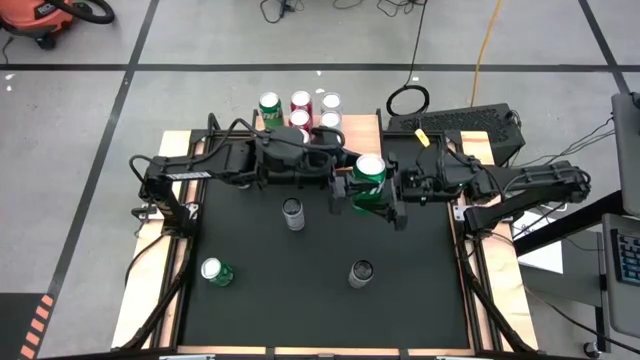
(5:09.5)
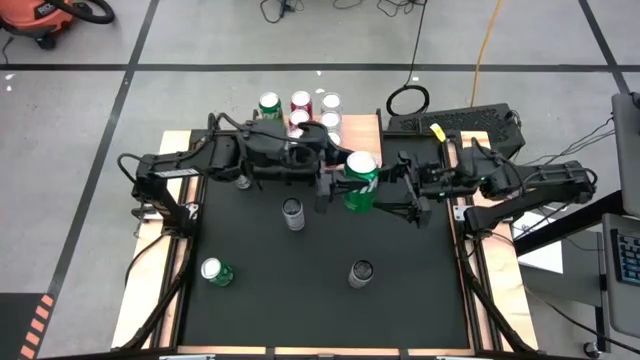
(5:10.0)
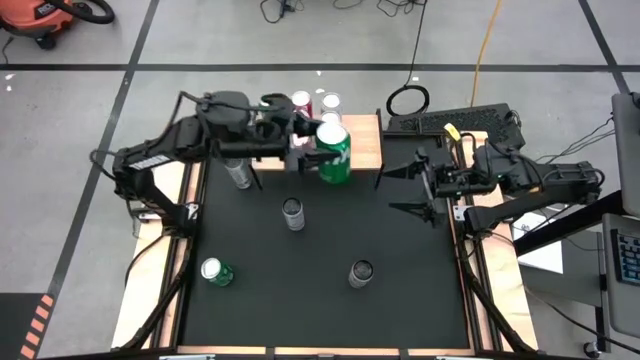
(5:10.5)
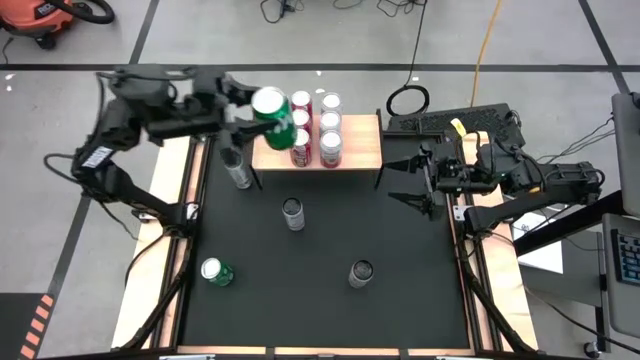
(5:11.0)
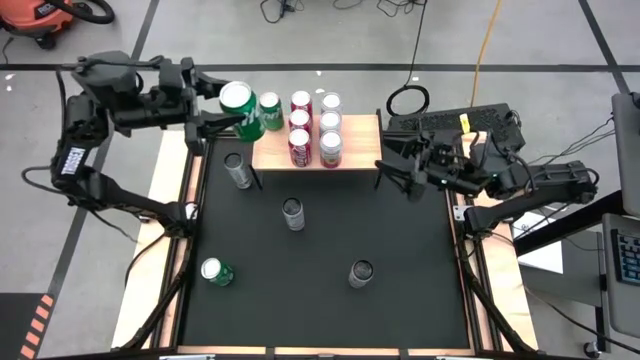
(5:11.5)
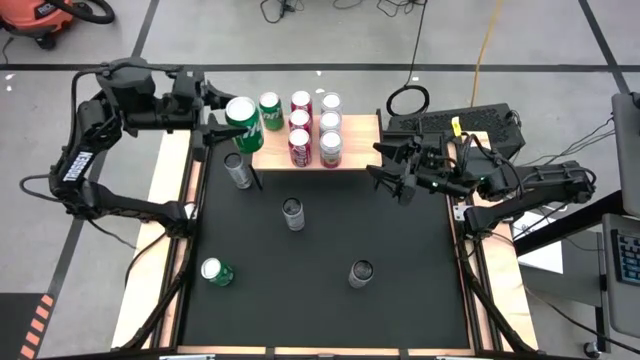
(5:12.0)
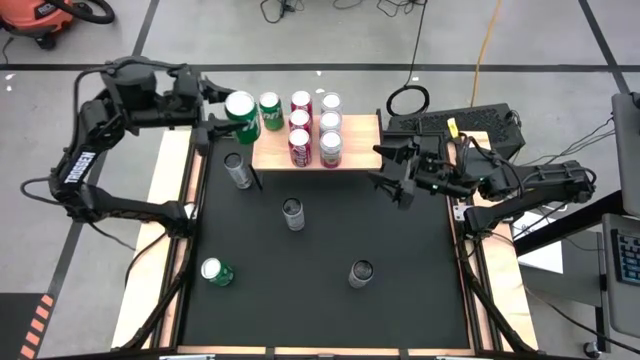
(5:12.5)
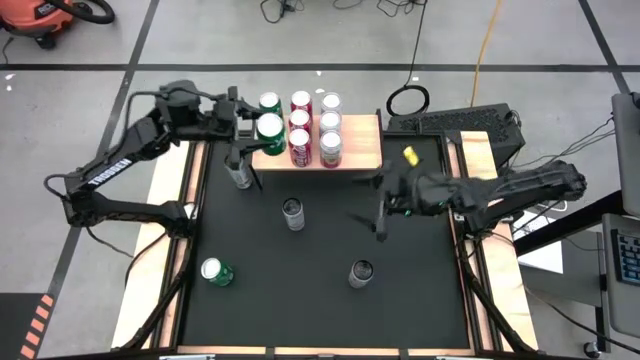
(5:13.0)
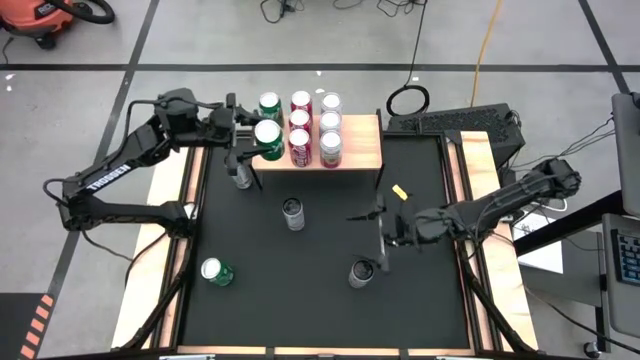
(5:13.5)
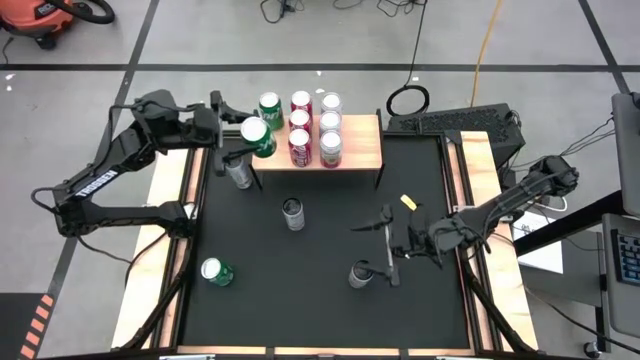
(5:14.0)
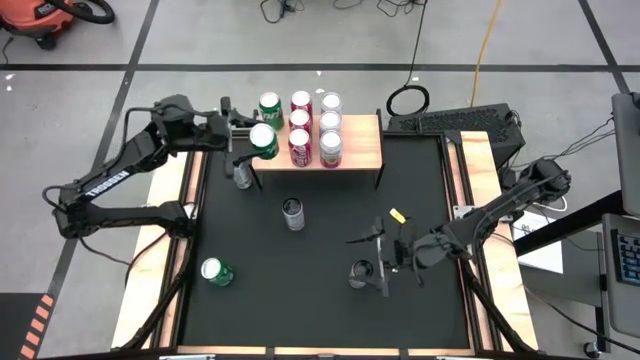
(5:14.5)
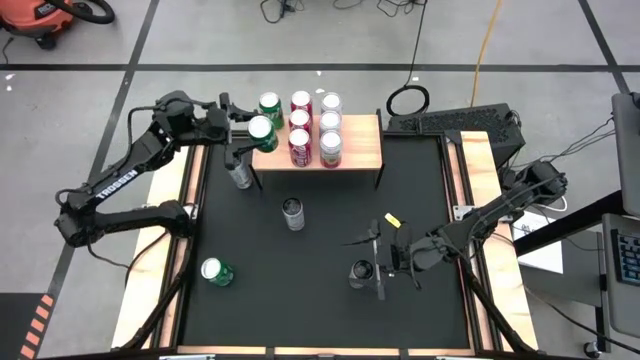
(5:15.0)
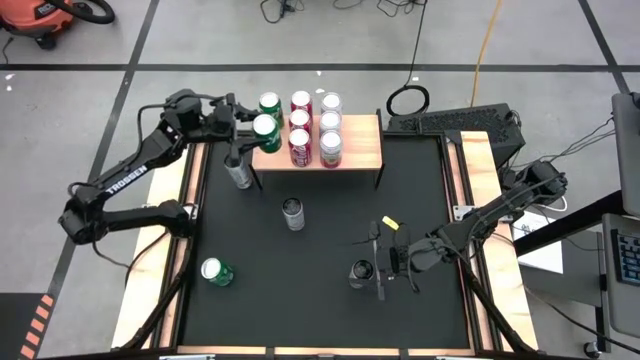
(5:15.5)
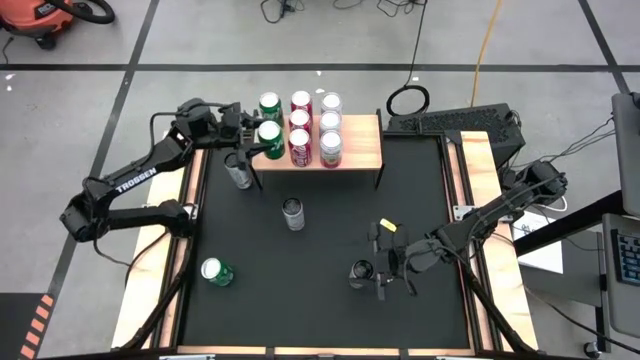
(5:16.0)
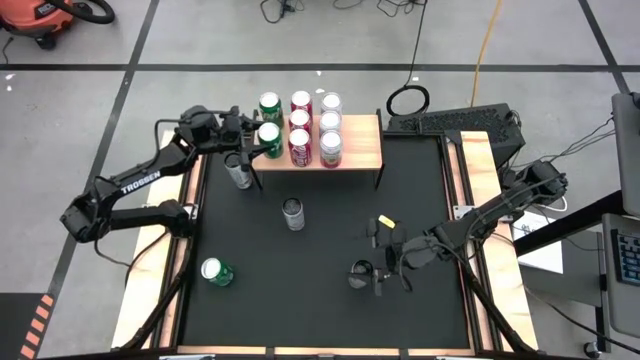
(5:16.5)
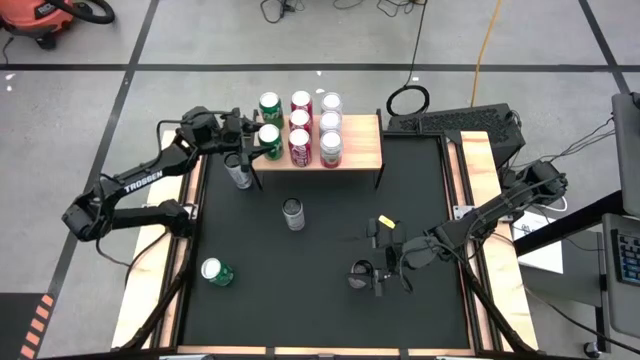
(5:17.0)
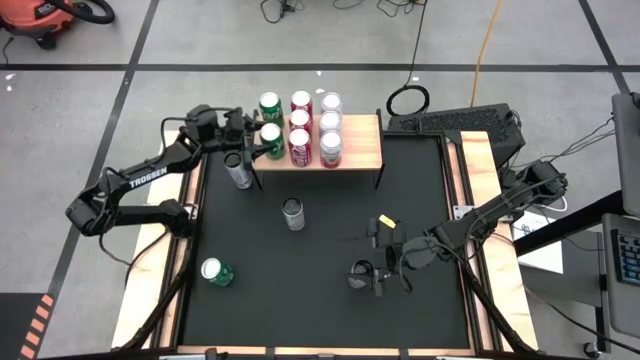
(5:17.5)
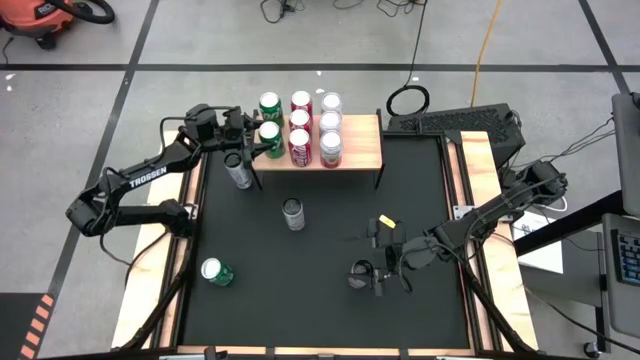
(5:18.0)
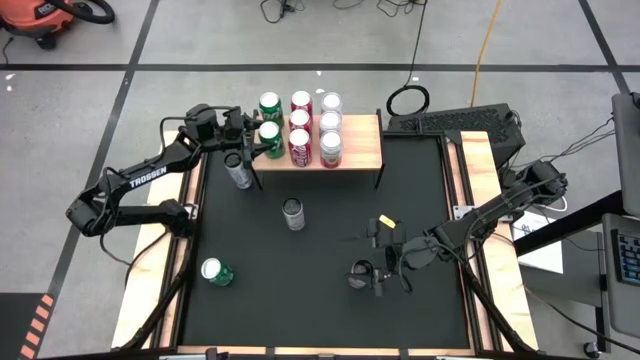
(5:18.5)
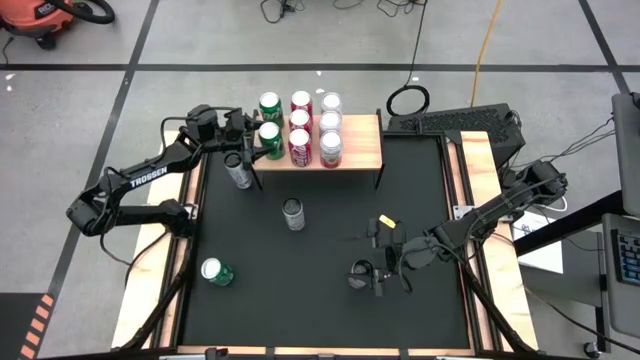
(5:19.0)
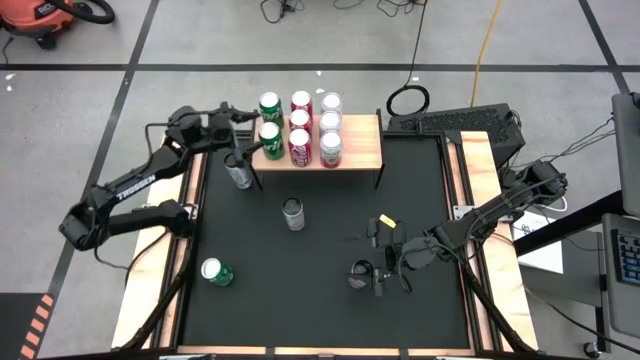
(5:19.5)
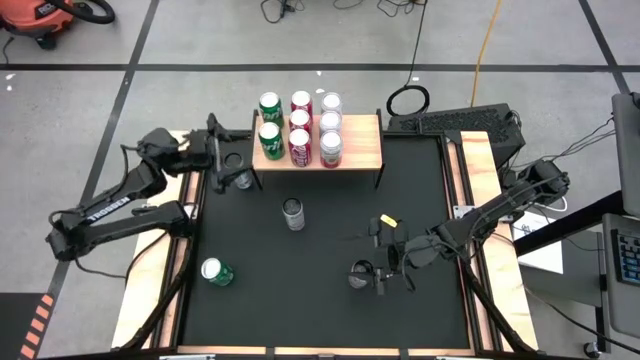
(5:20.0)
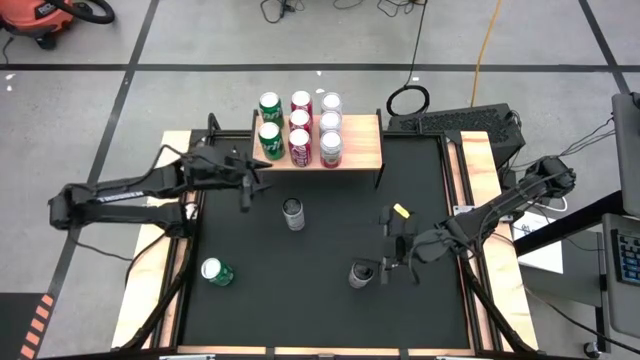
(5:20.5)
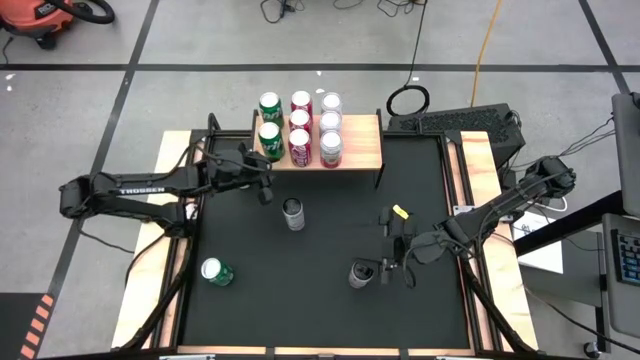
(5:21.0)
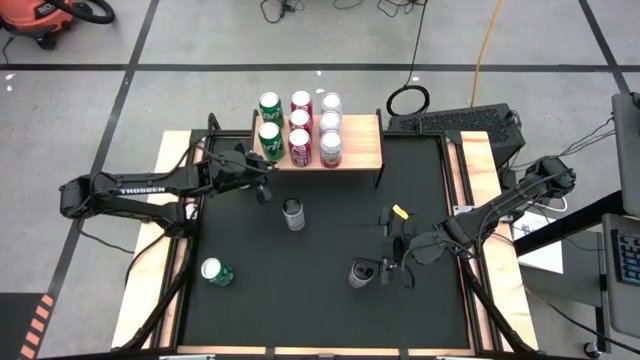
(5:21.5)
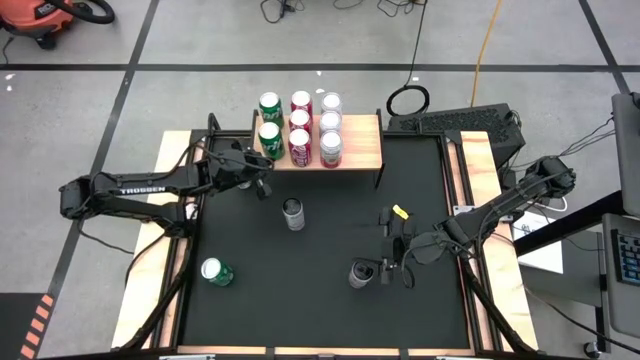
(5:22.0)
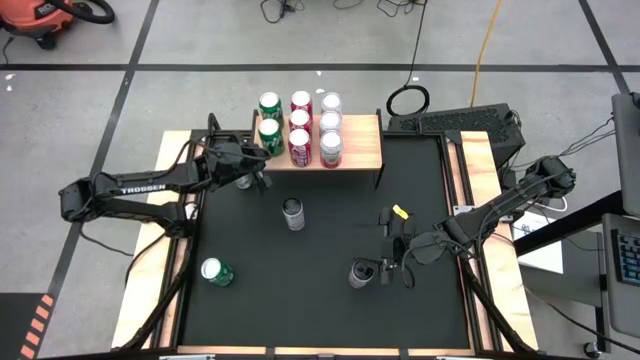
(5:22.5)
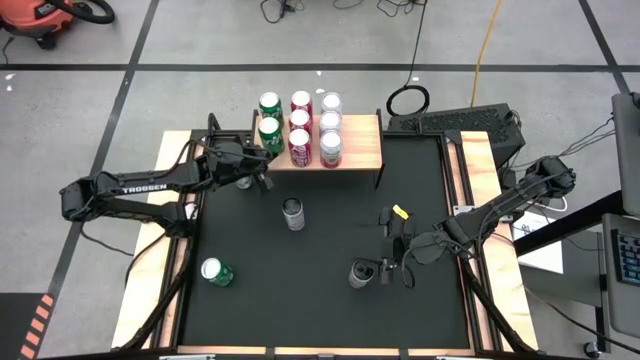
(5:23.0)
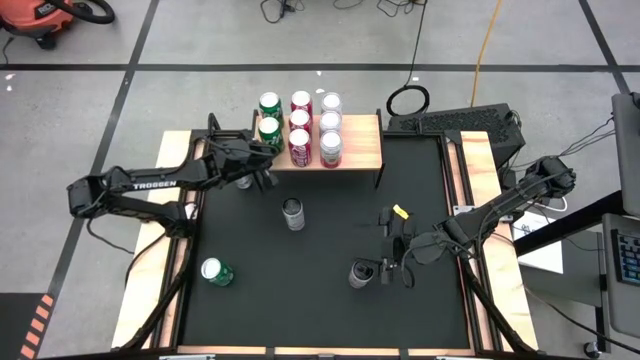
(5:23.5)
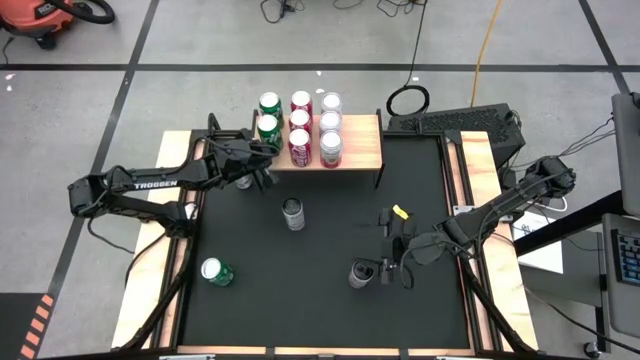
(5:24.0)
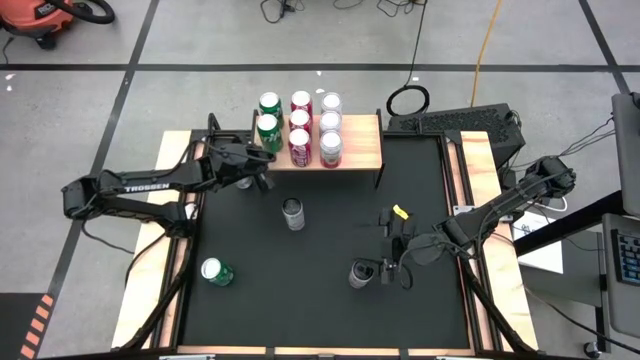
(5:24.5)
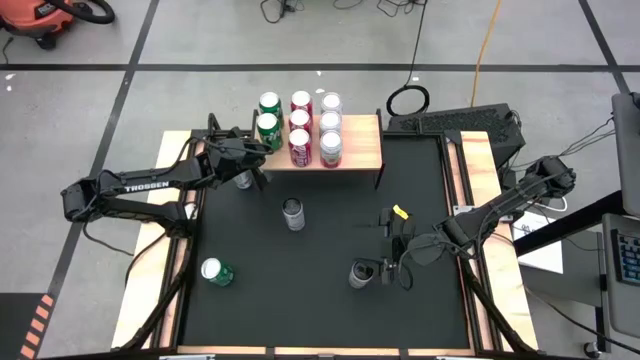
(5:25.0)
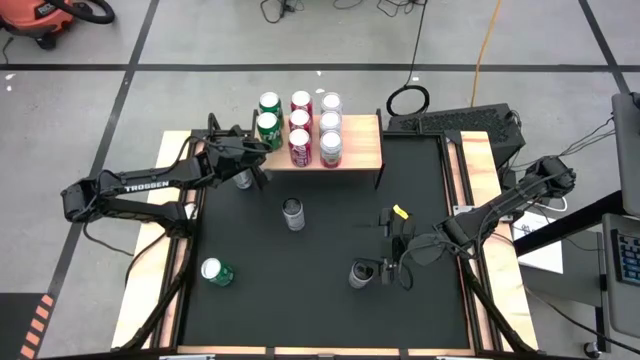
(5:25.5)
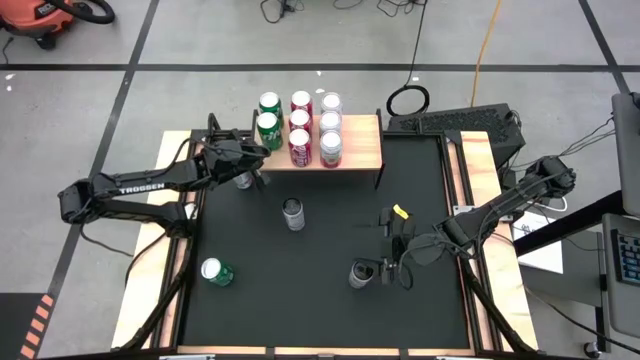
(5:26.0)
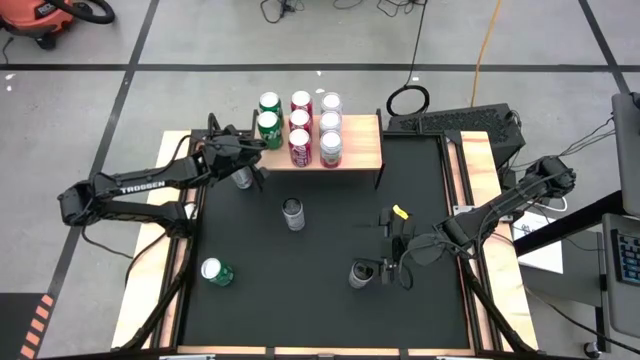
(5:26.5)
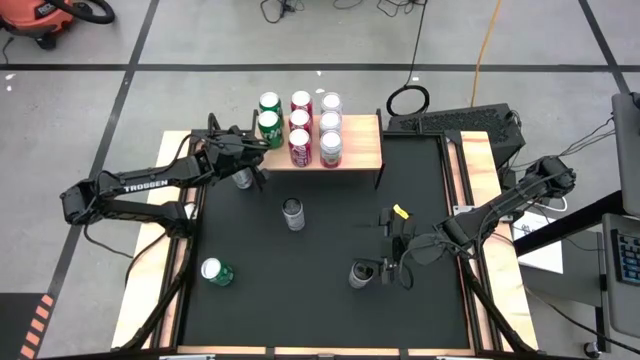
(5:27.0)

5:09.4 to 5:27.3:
Task: Place canned beverage on shelf
Put the top green soda can on the shelf aligned with the other green soda can

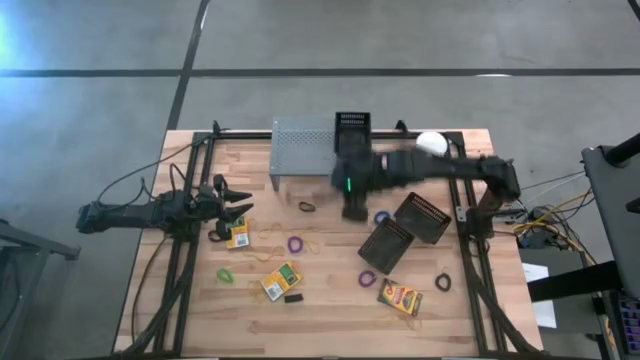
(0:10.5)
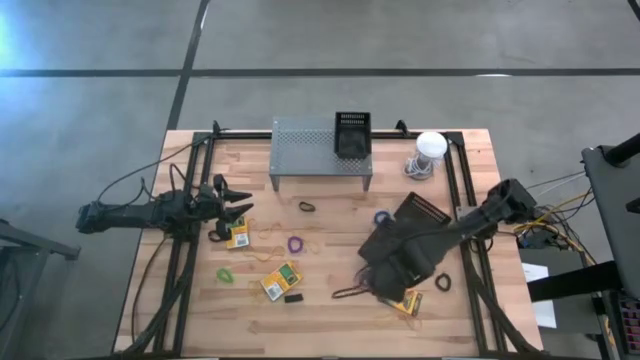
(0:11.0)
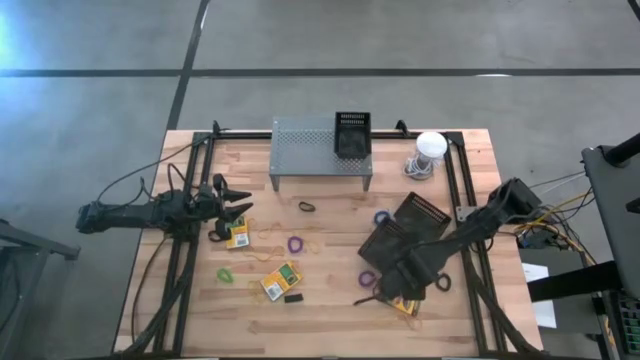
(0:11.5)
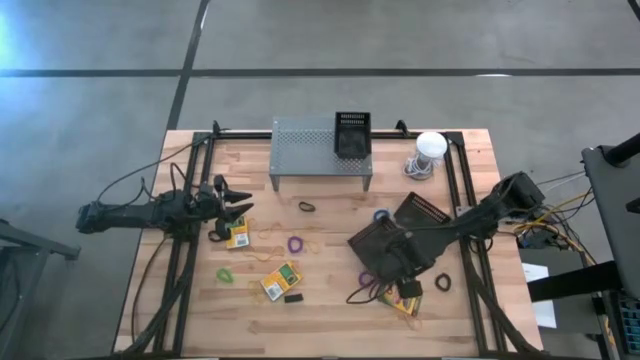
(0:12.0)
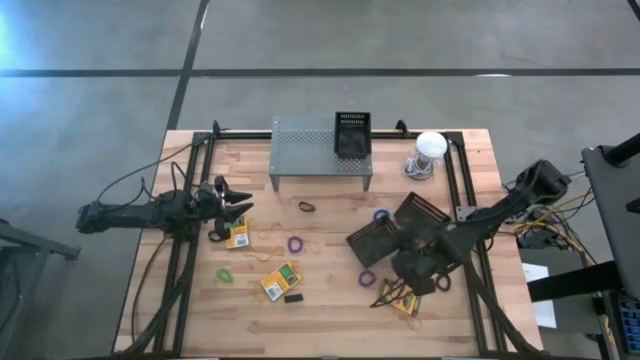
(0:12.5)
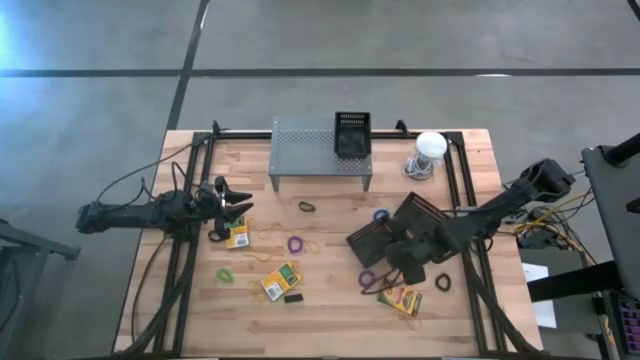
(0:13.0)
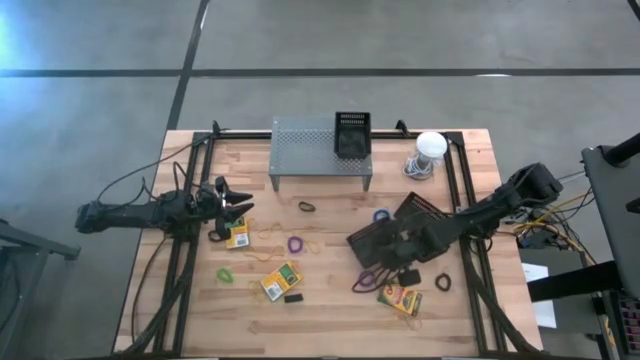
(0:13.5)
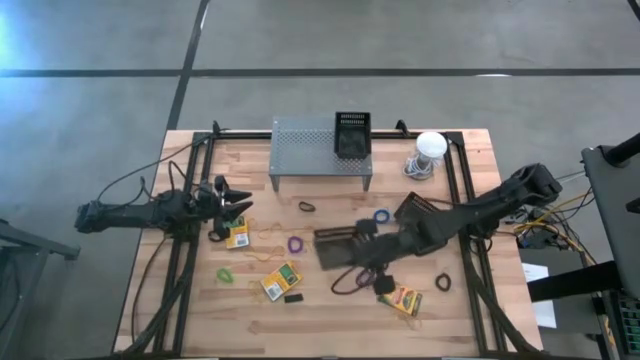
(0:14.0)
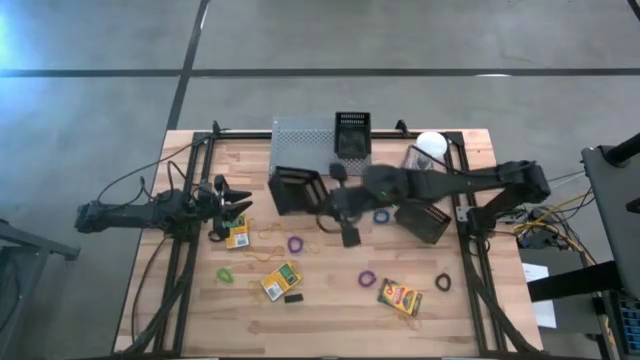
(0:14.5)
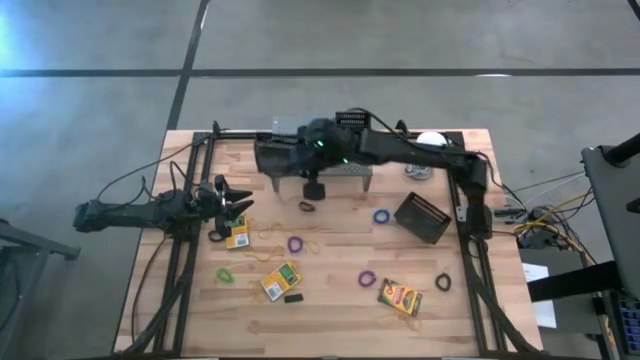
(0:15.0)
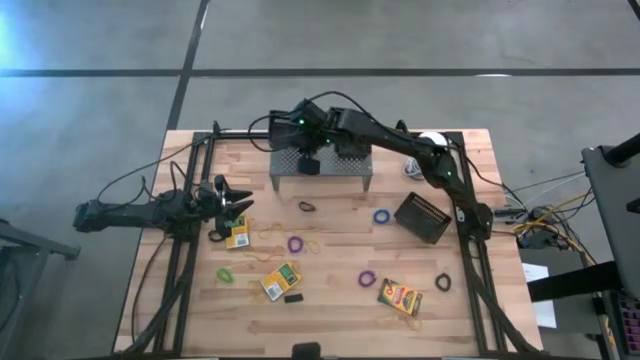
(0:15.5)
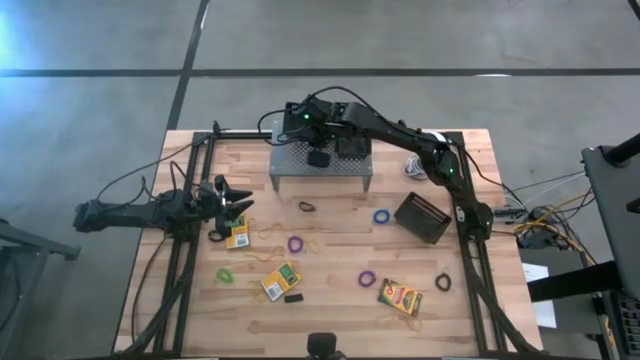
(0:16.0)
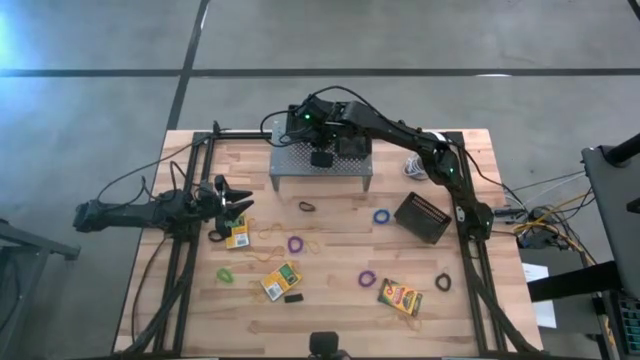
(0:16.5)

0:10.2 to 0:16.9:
Task: Pick & Place Office Desk Supplies
Put the left black bin on the shelf
